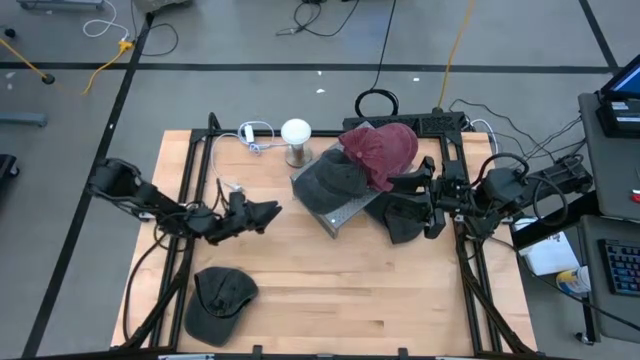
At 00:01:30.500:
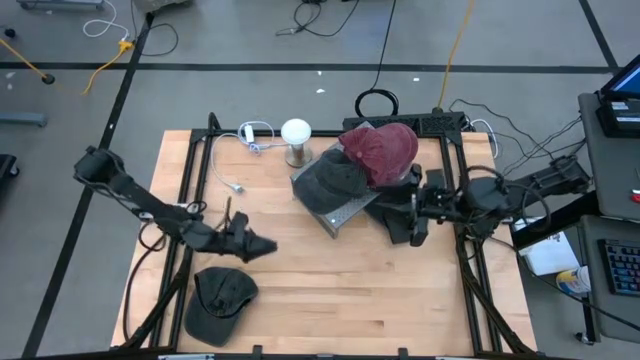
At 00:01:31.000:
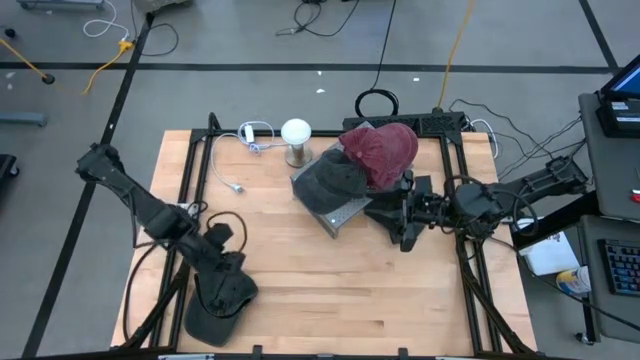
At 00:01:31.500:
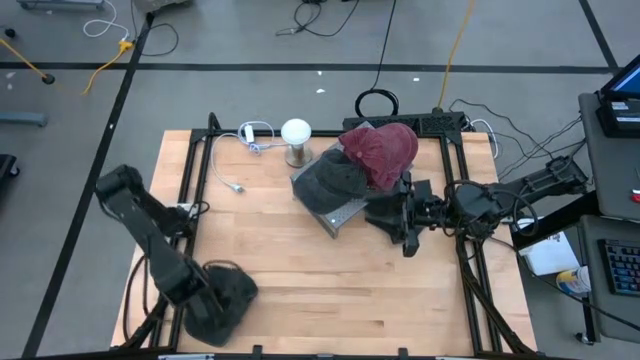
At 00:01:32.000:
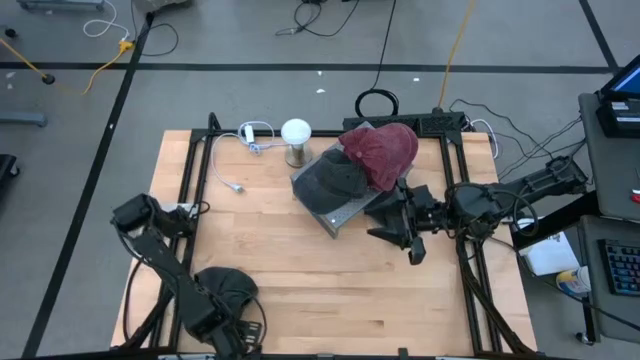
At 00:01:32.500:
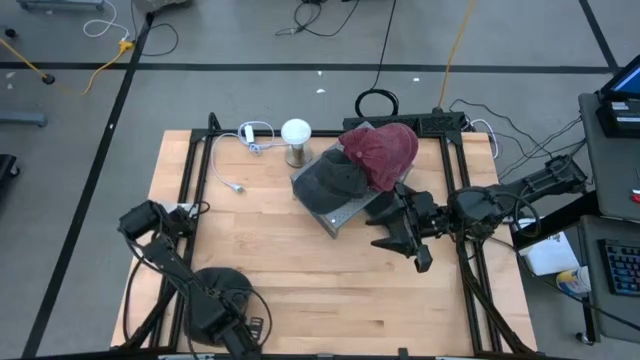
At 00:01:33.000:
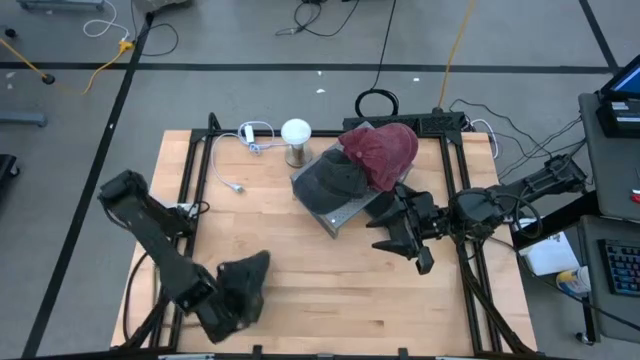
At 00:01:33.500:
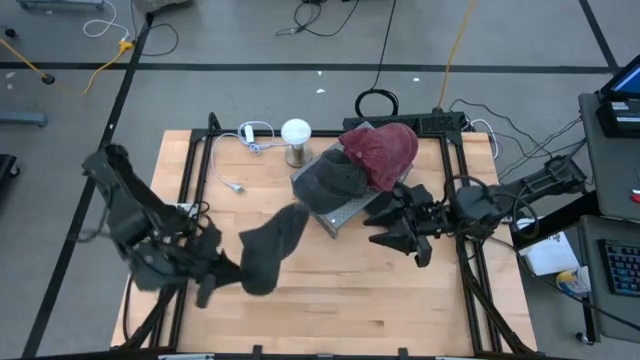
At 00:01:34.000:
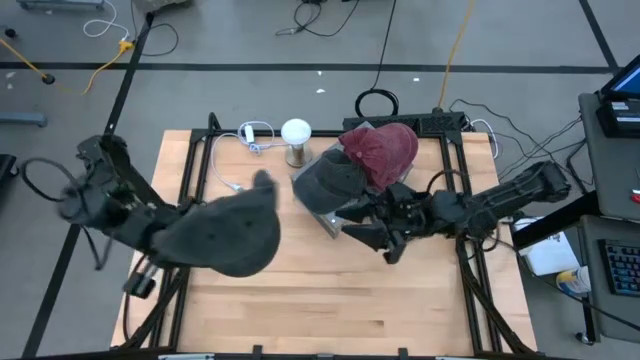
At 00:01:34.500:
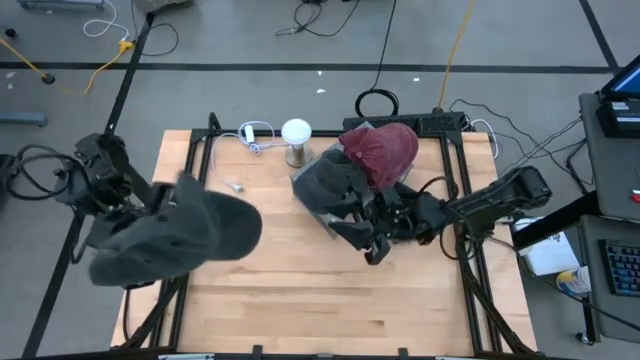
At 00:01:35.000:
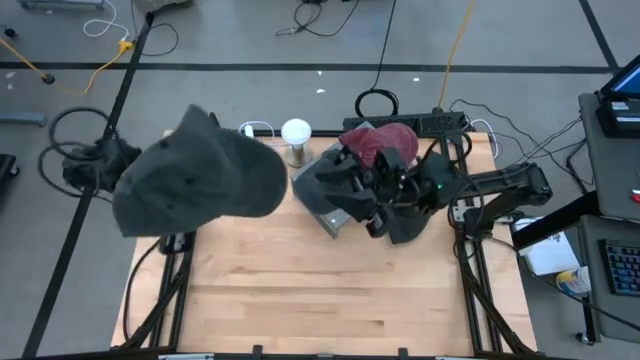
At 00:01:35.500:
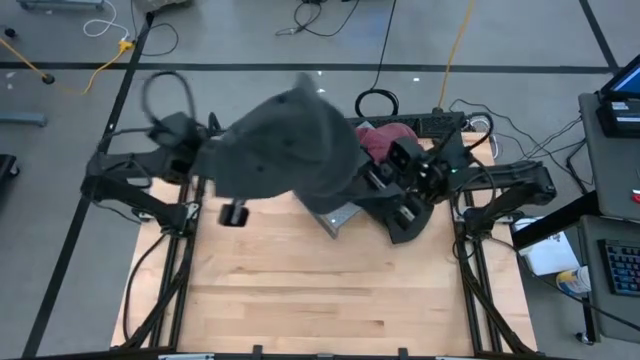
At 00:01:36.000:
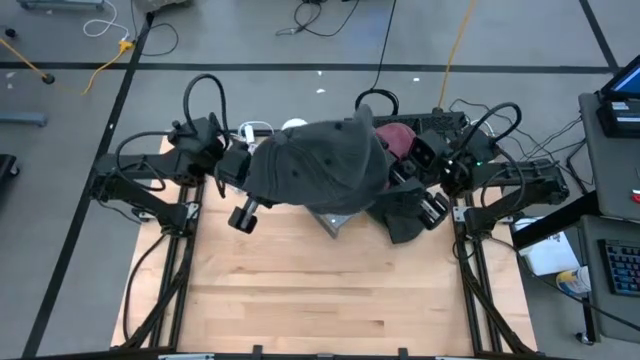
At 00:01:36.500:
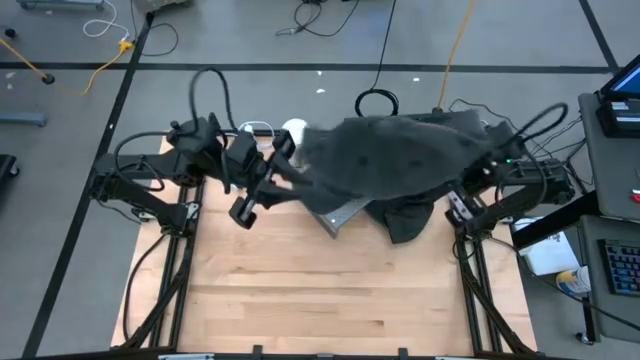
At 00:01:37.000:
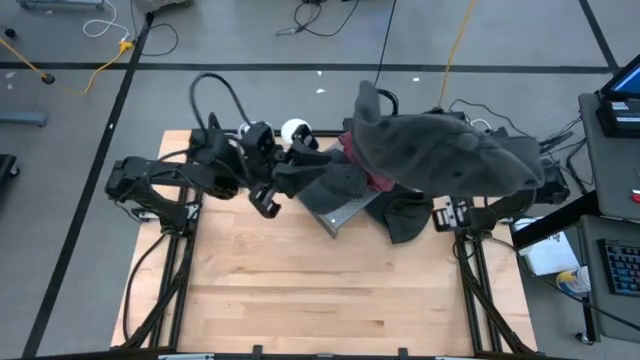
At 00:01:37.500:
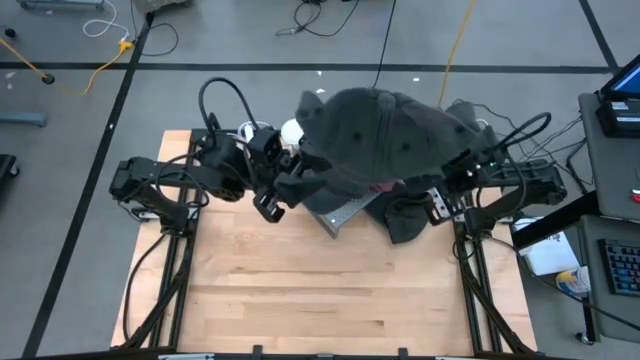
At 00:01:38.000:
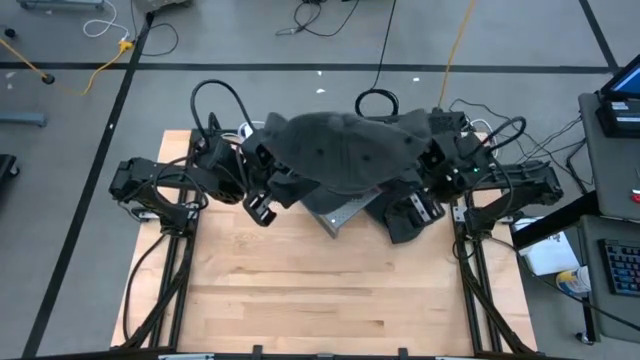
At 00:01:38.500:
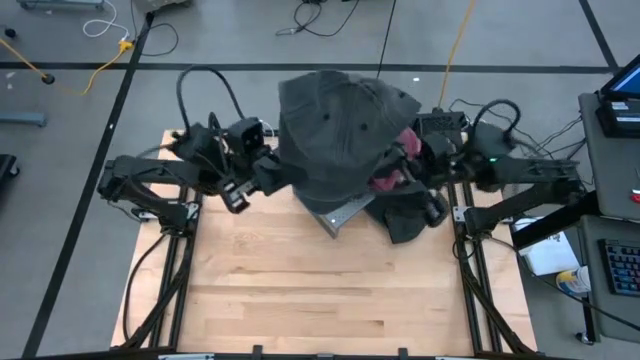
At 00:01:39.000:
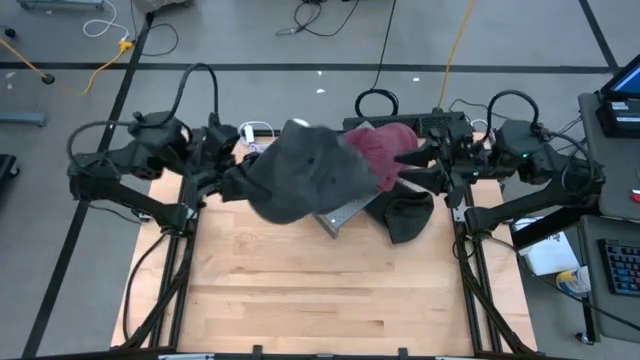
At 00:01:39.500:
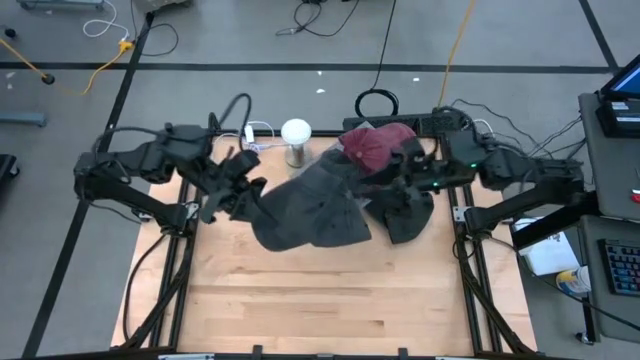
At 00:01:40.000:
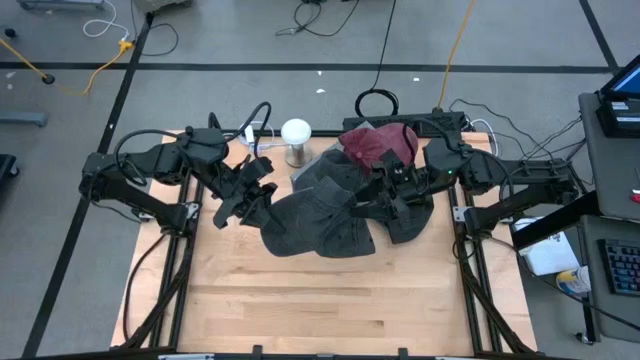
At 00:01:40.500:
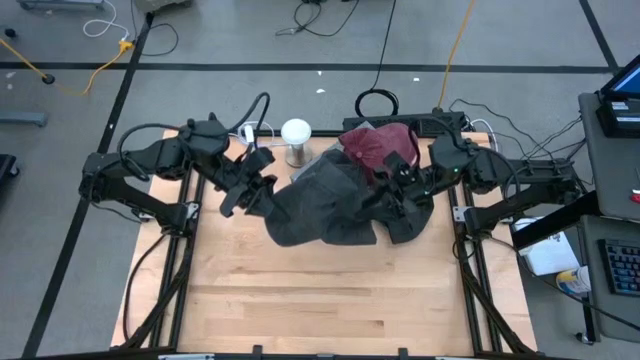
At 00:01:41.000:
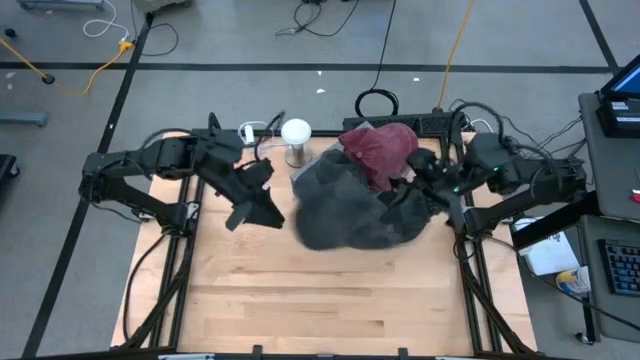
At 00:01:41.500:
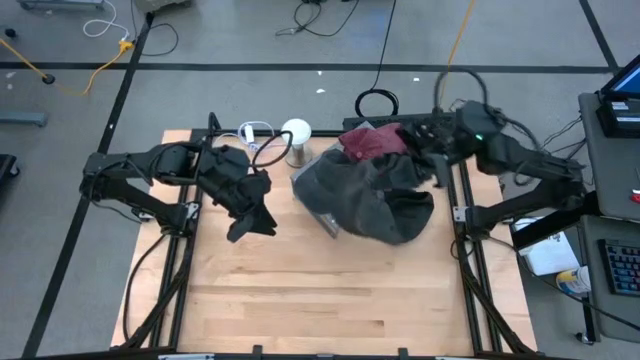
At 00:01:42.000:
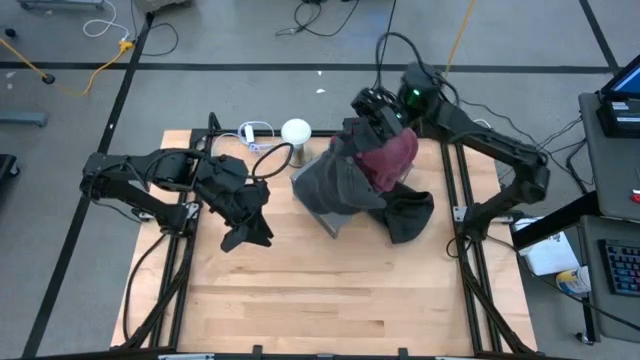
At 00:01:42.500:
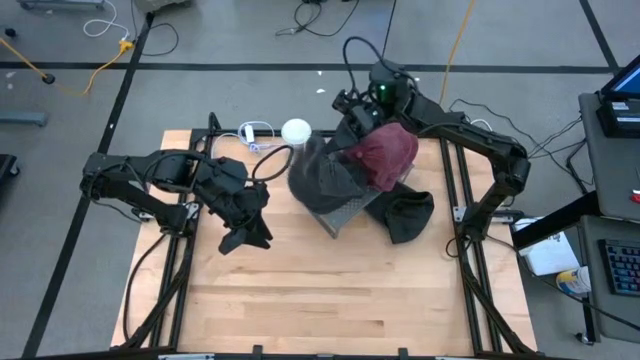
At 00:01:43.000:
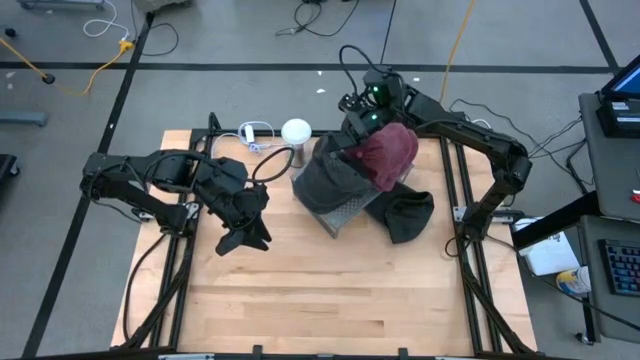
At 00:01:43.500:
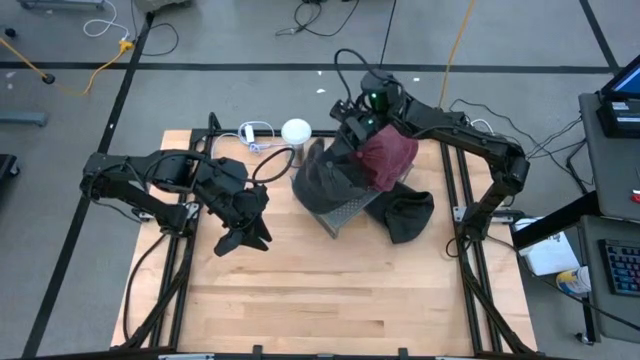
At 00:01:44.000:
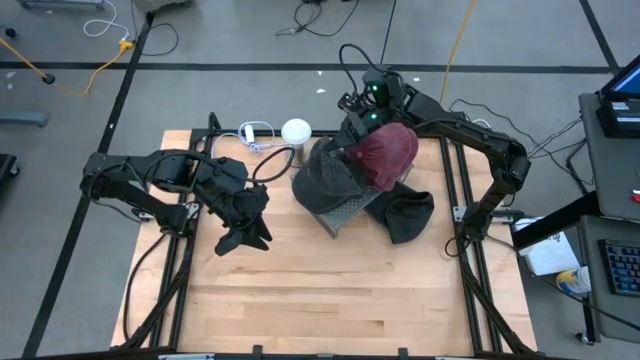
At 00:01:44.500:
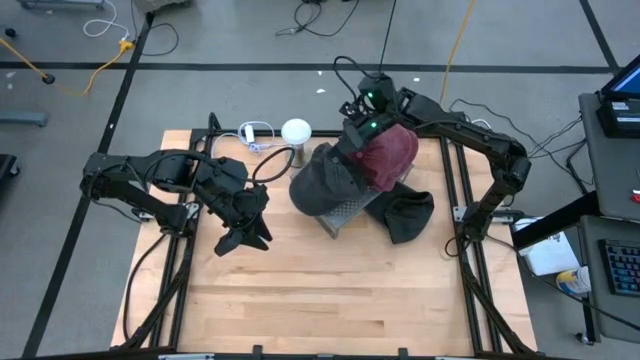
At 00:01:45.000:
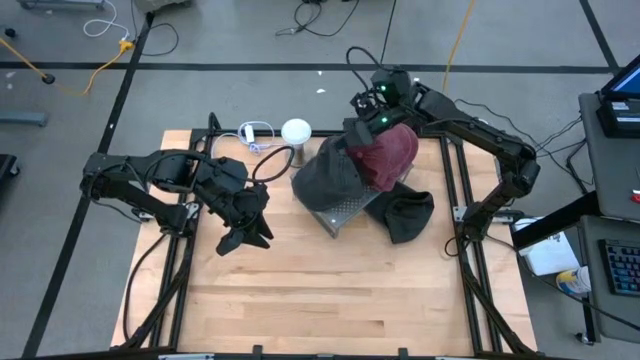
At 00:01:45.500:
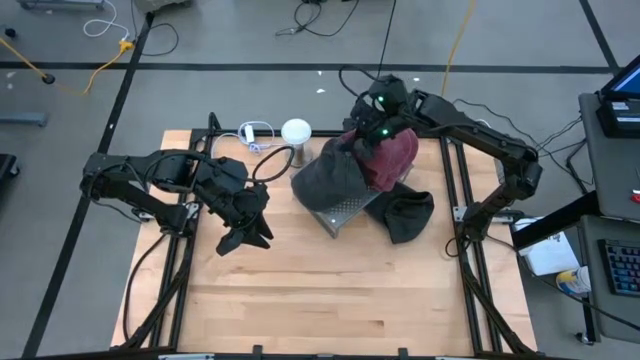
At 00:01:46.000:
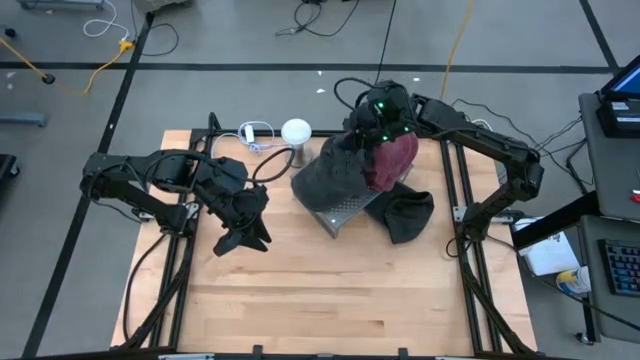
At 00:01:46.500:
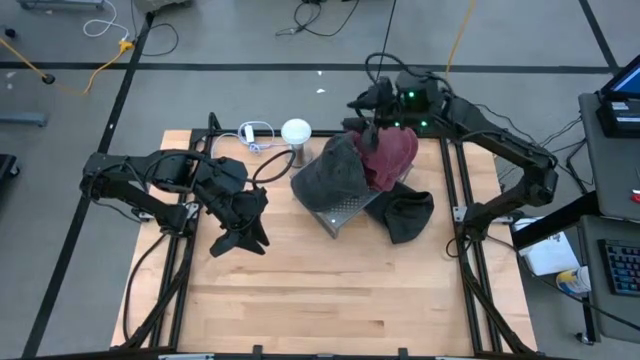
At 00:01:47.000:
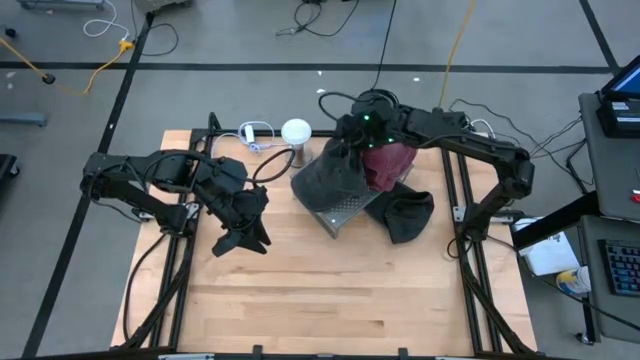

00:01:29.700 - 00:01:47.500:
Task: Pick & Place hat
Stack the bottom black cap on top of the black cap on the shelf
